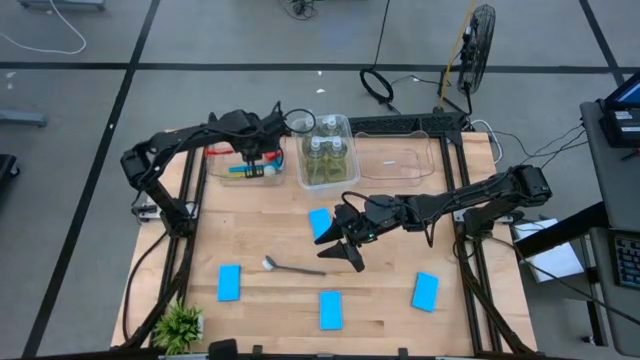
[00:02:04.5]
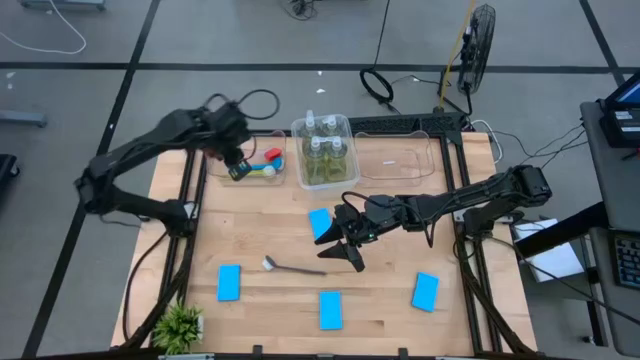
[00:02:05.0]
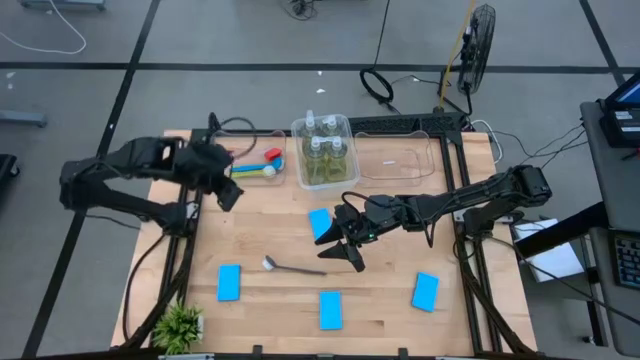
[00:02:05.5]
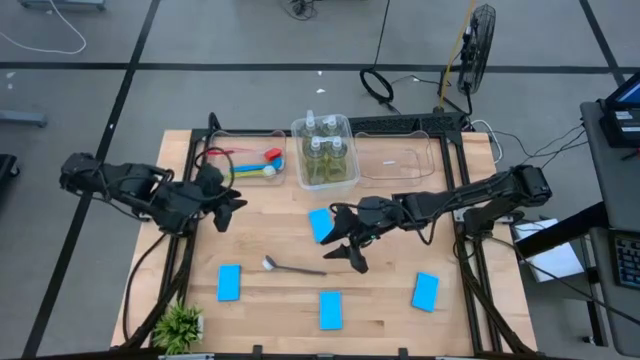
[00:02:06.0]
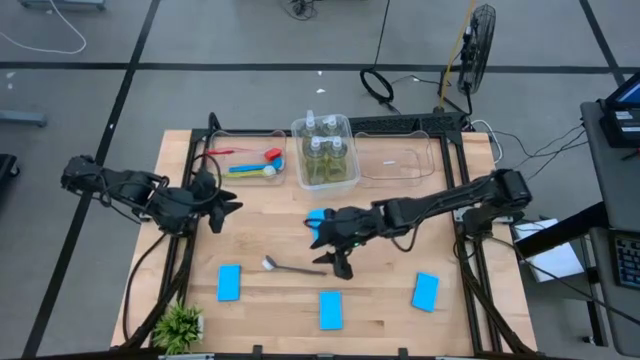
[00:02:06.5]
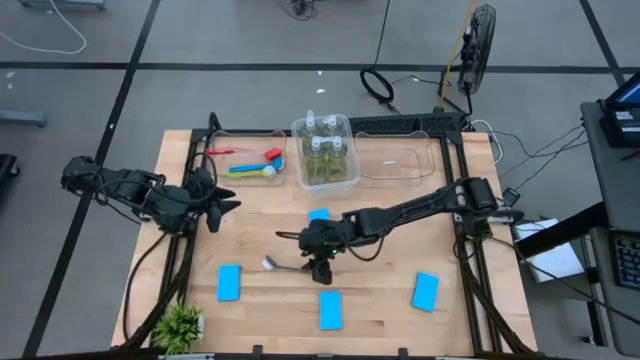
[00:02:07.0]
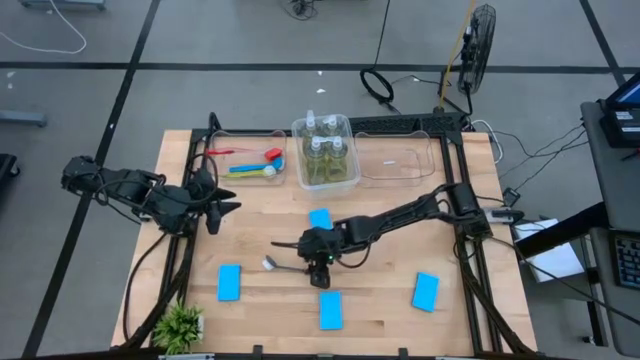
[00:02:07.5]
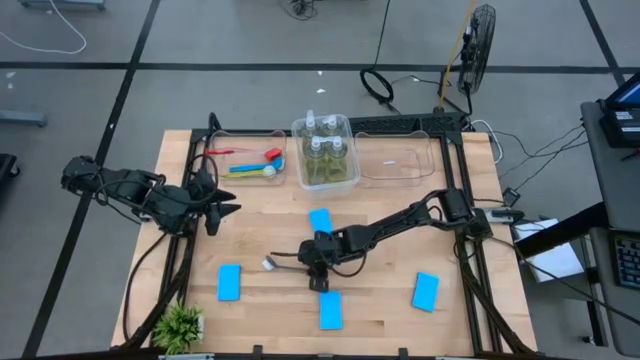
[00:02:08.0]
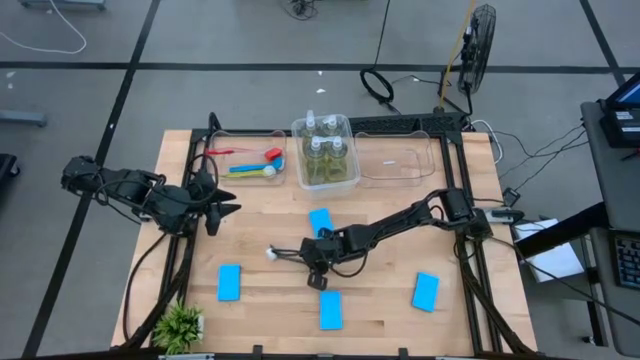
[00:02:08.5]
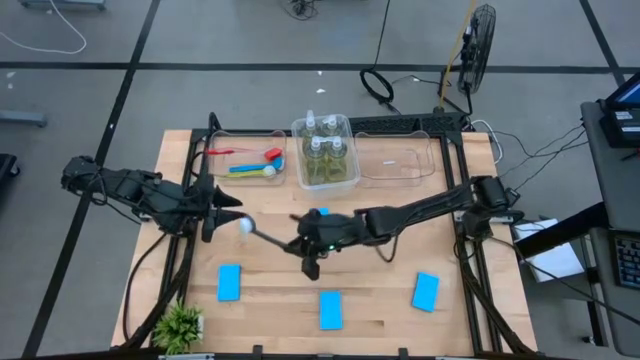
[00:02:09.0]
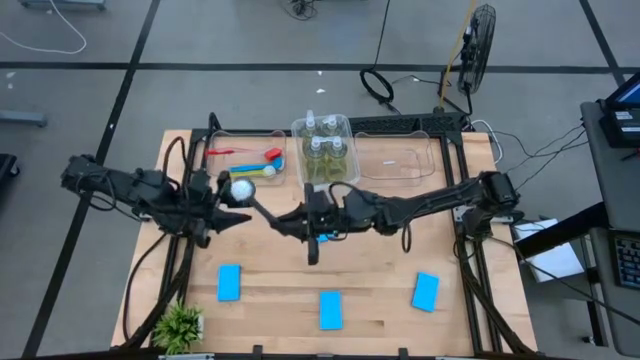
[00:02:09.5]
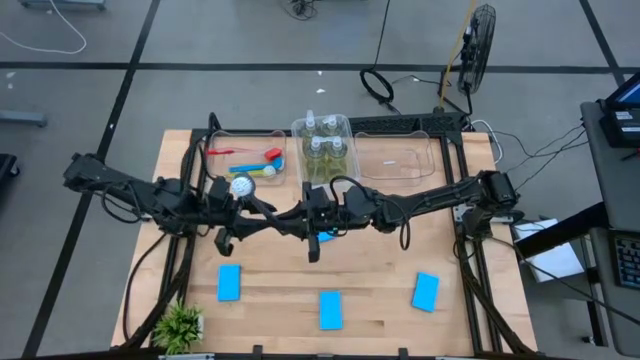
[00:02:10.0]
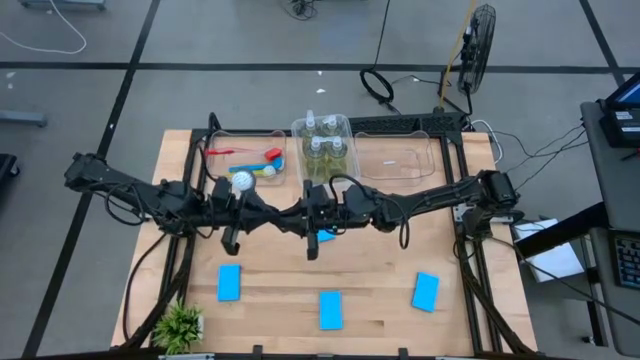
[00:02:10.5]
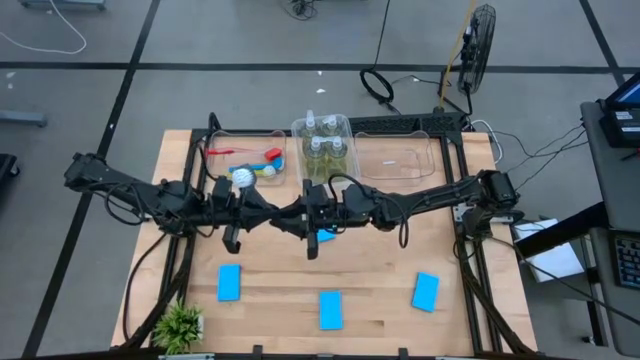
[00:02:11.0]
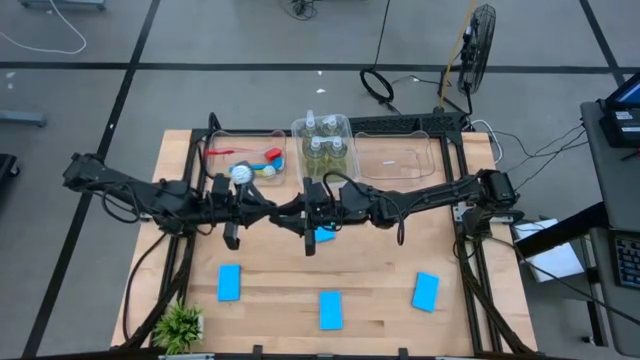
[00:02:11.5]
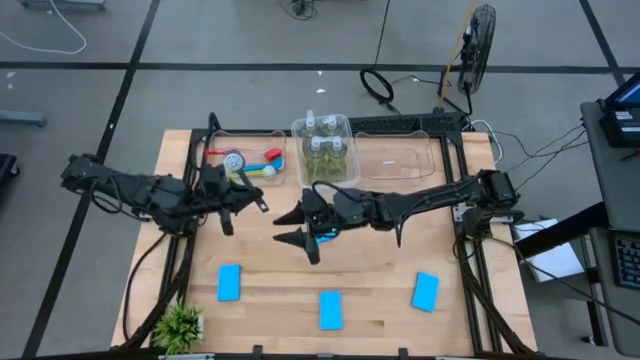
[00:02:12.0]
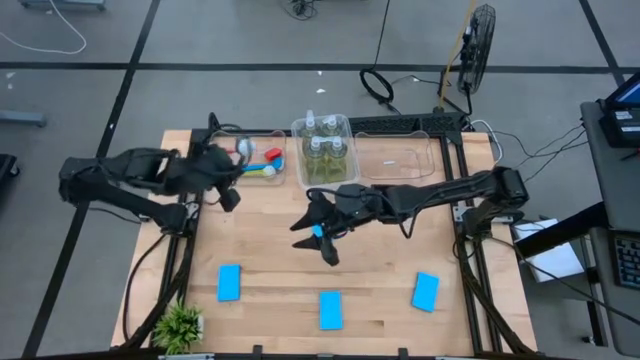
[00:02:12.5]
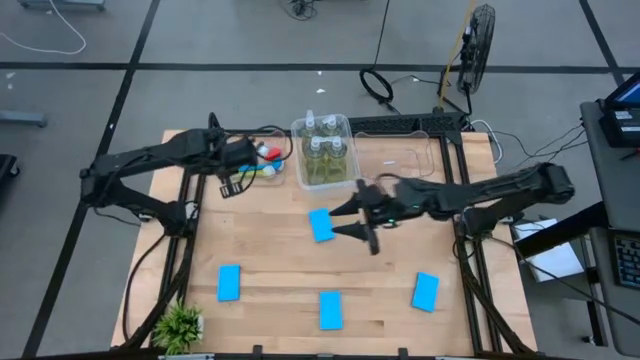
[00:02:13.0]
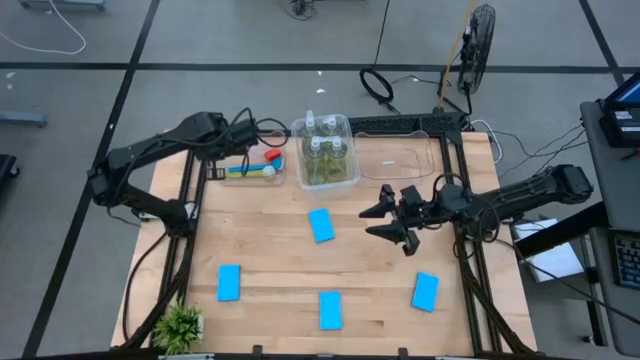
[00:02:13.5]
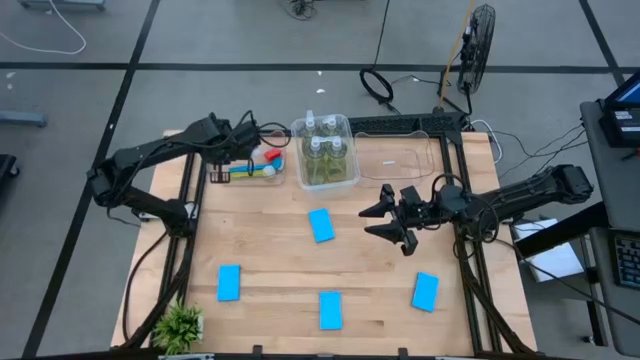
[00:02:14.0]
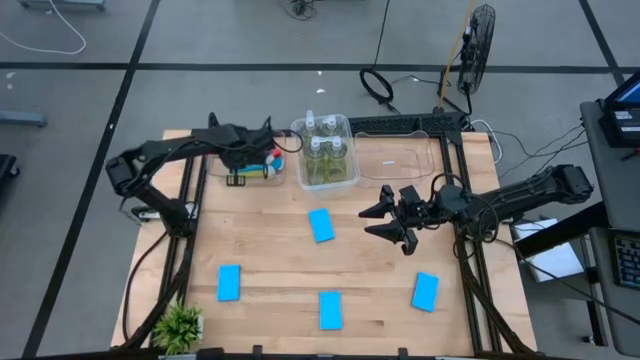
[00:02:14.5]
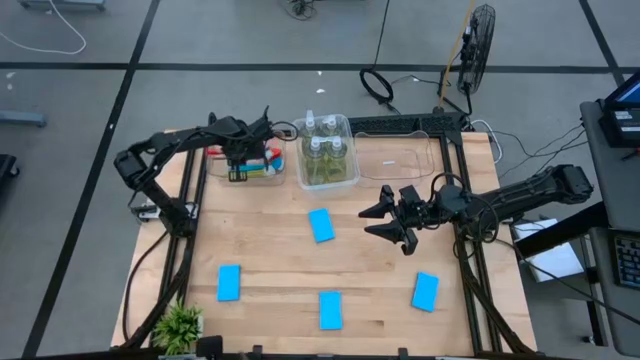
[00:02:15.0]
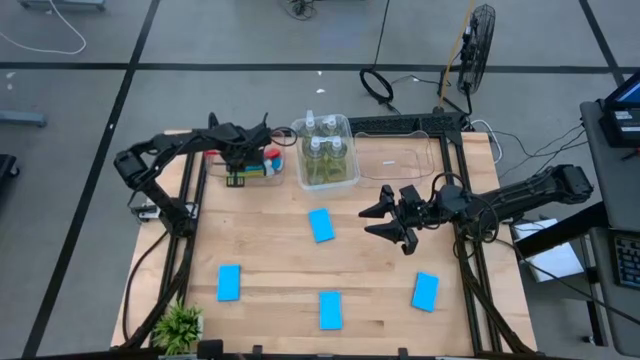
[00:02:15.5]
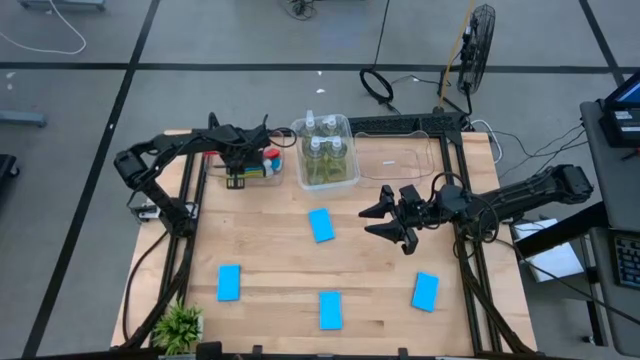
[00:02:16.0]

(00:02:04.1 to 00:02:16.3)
Task: Pick & Place Kitchen Sink Supplies
Put the black dish brush into the left transparent bin

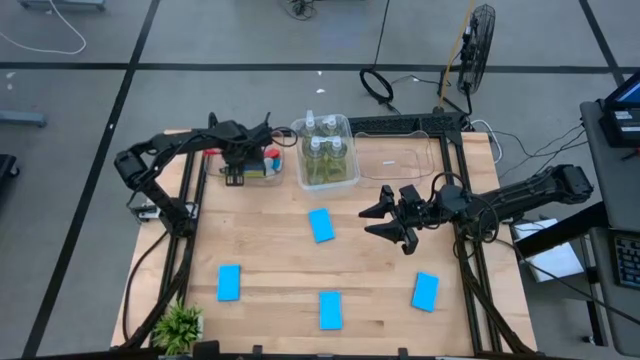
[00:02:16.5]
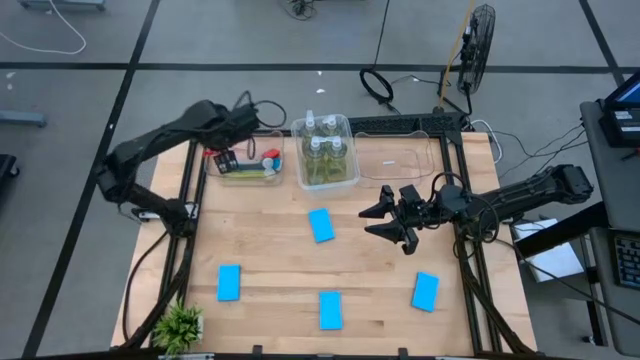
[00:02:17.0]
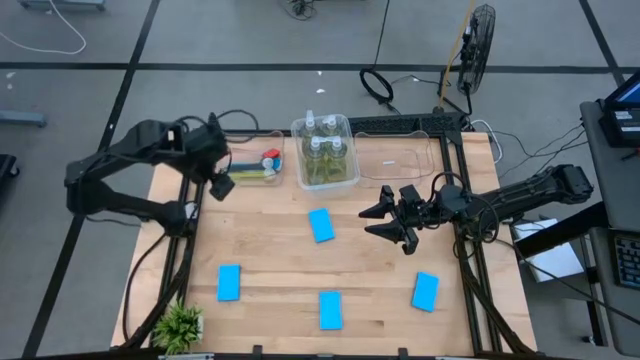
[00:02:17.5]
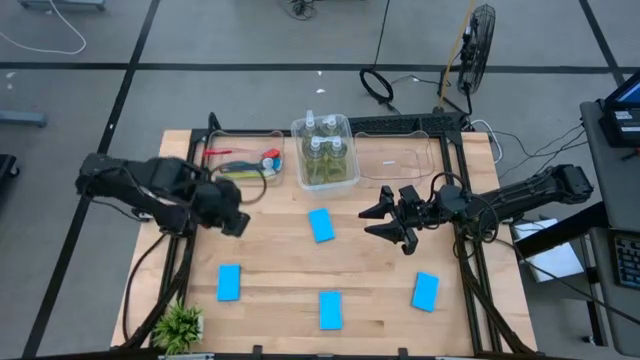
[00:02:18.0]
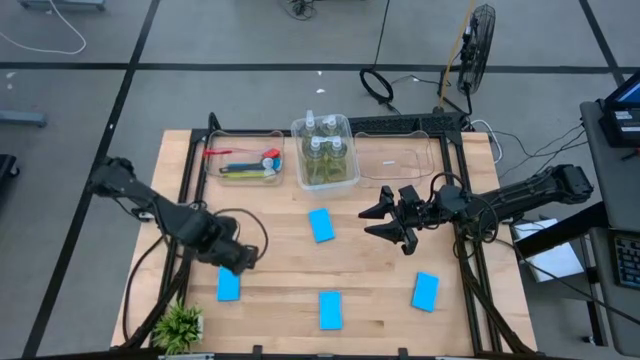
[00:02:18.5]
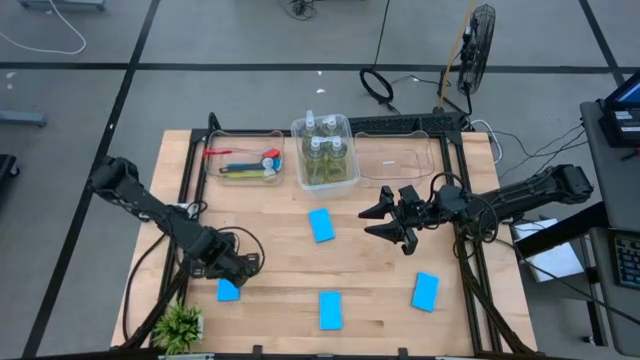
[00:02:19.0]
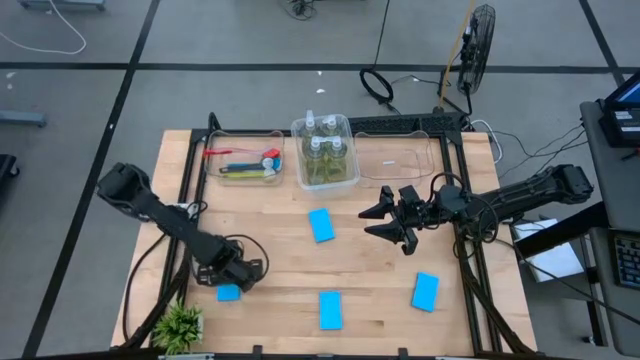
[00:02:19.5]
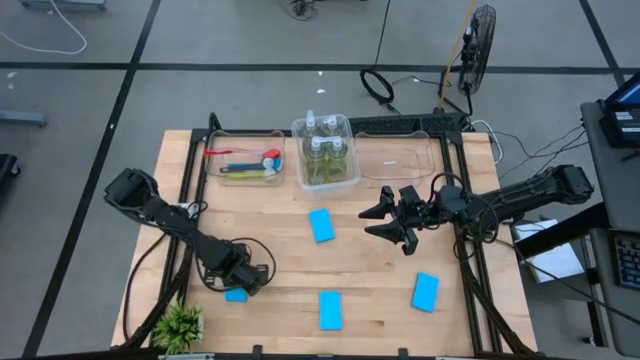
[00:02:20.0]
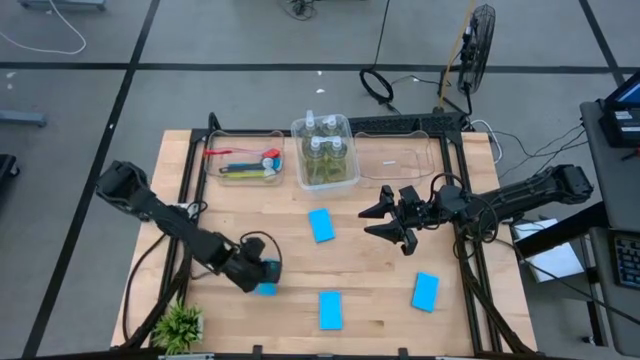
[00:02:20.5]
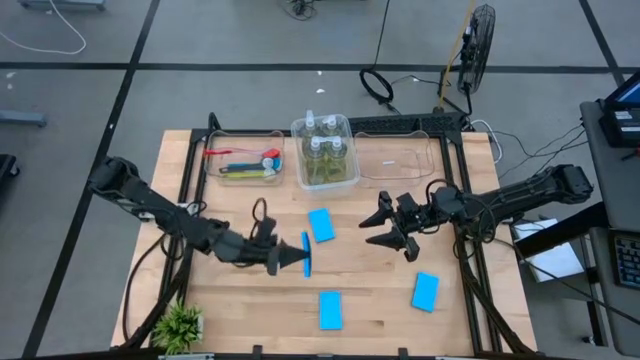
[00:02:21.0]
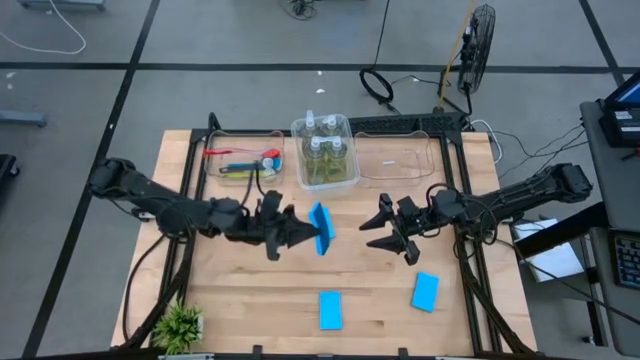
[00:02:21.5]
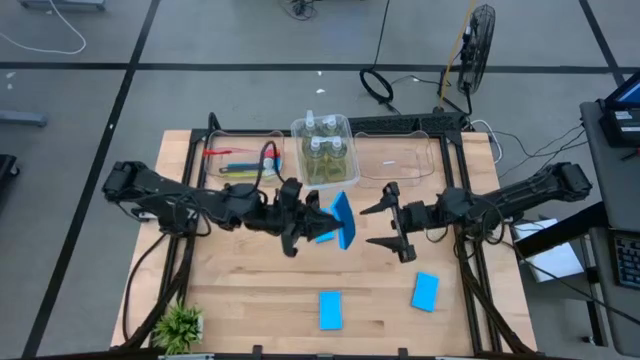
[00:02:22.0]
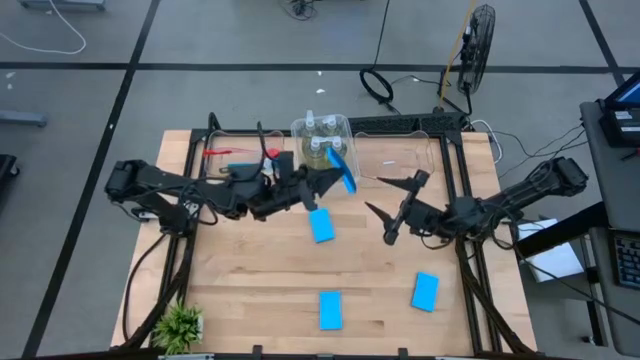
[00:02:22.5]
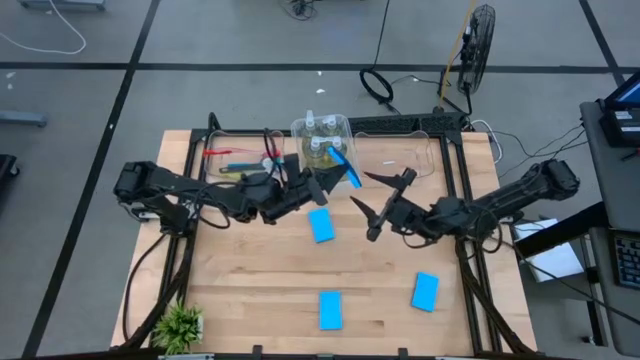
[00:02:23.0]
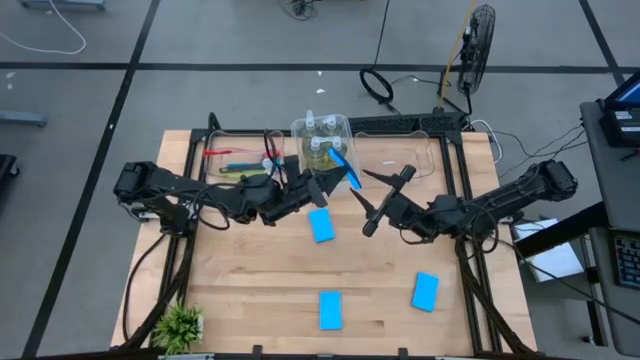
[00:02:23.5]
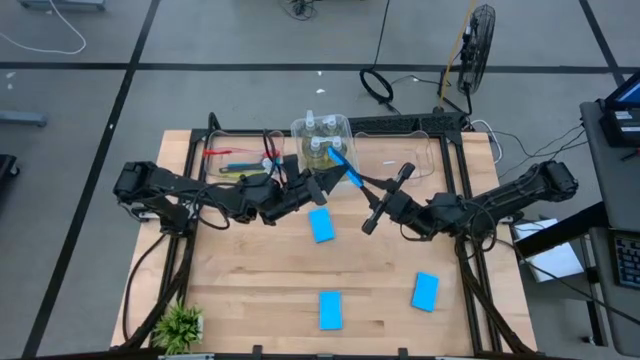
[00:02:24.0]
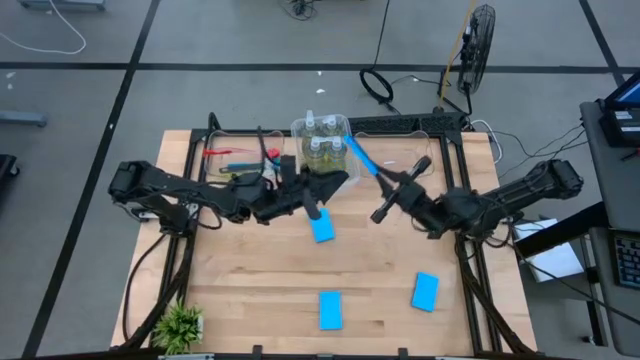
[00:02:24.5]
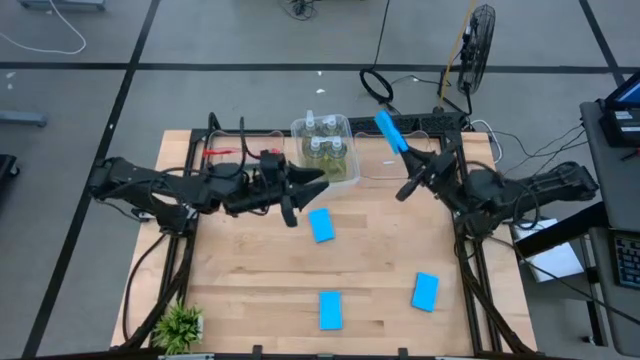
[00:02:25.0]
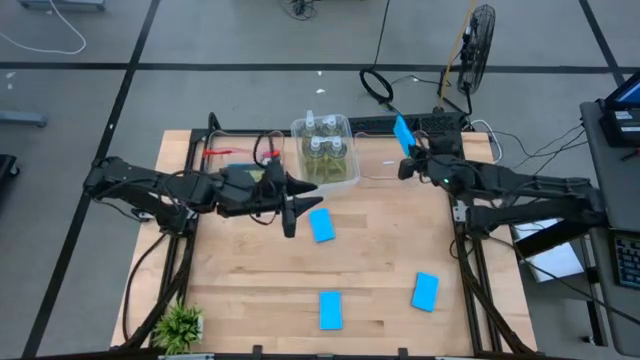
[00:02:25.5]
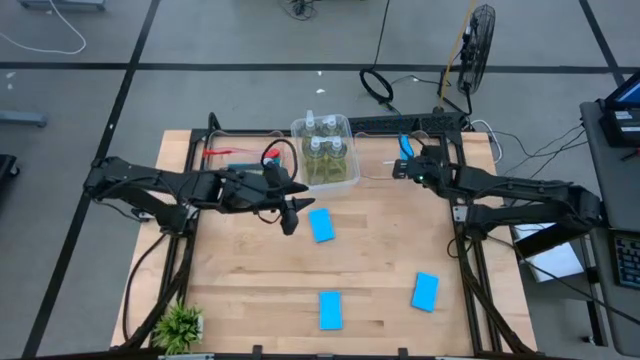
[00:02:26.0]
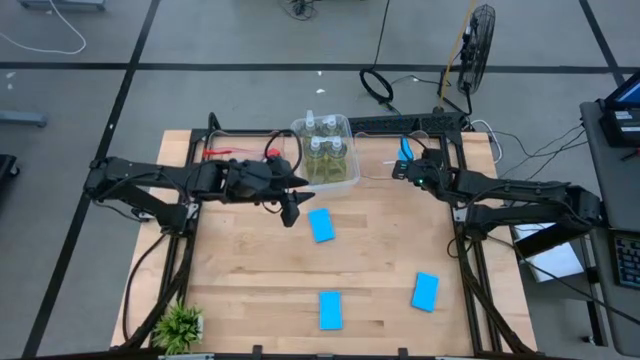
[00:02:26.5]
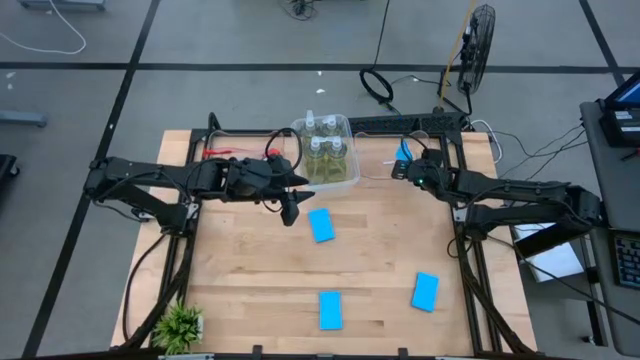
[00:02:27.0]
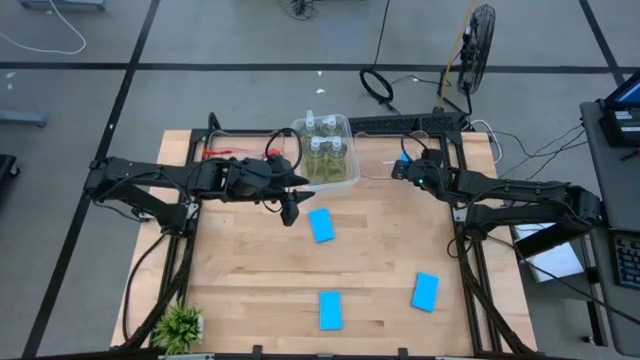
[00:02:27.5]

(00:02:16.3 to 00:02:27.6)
Put the blue sponge into the right transparent bin
